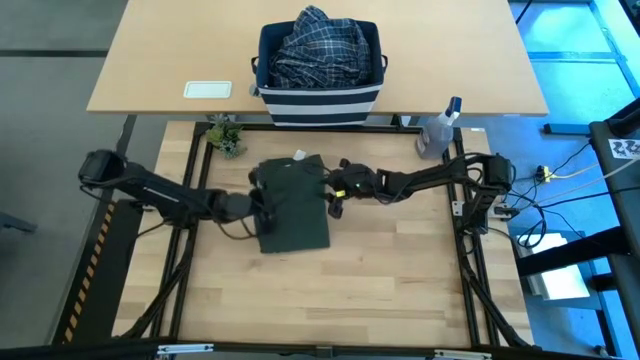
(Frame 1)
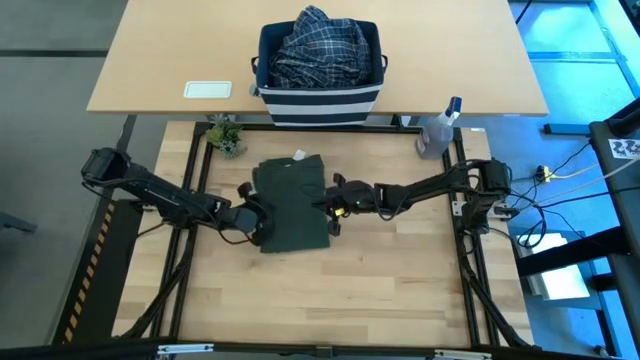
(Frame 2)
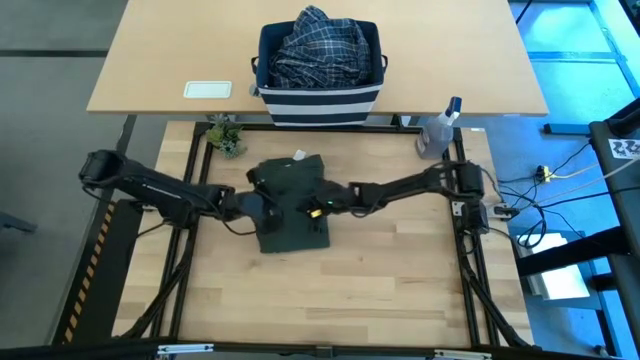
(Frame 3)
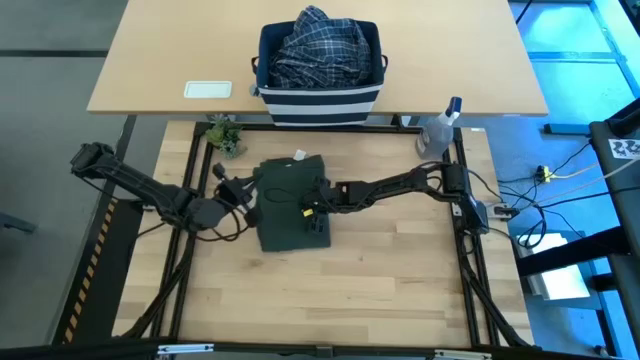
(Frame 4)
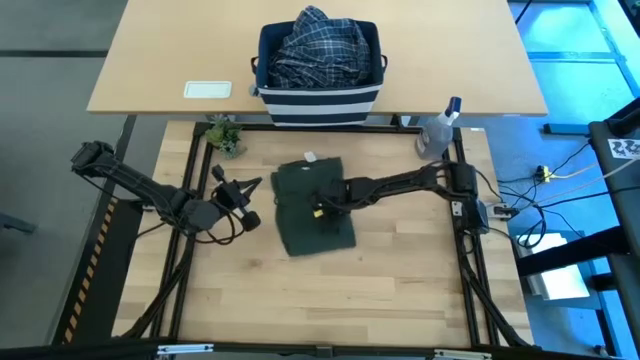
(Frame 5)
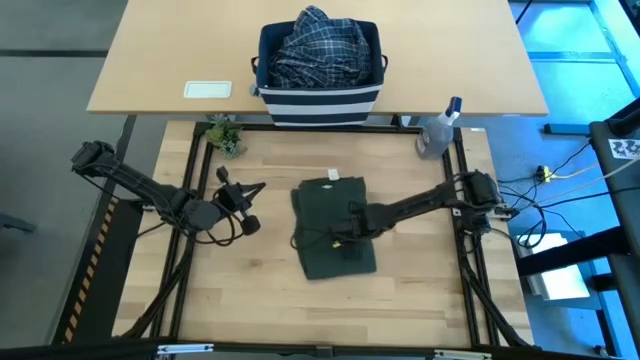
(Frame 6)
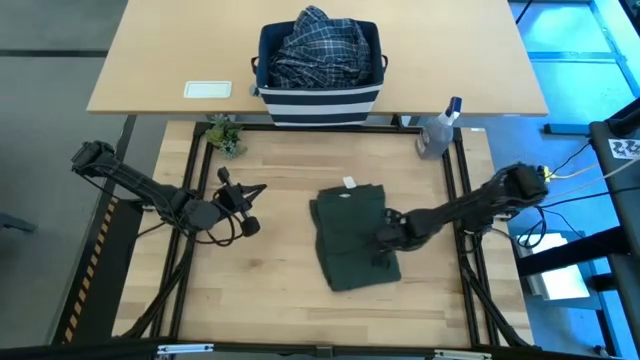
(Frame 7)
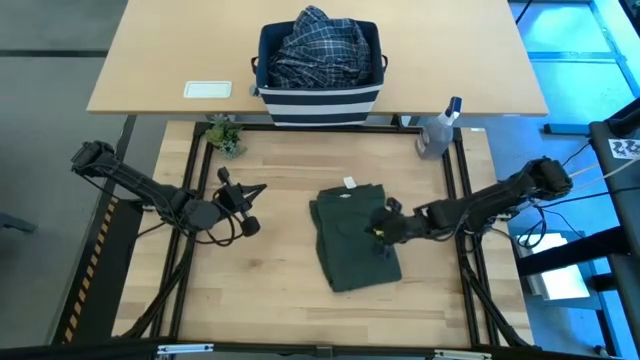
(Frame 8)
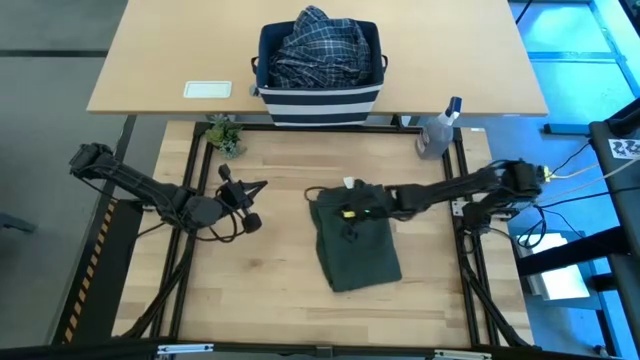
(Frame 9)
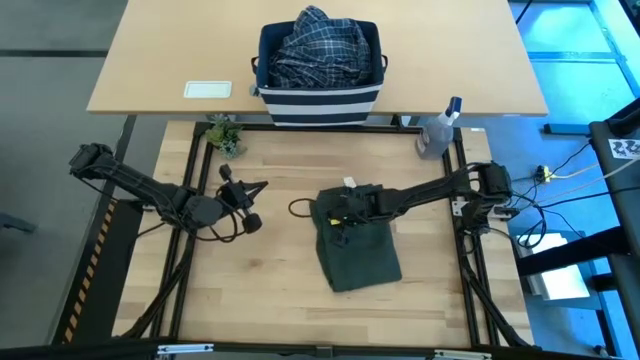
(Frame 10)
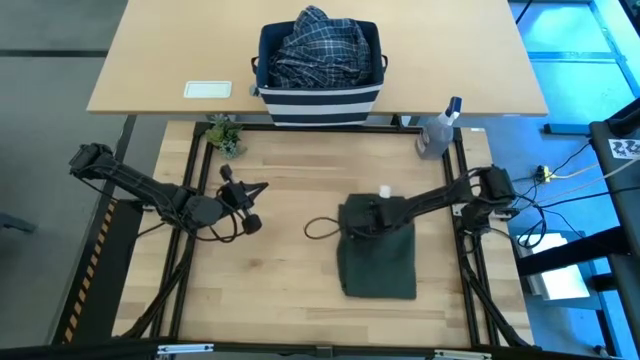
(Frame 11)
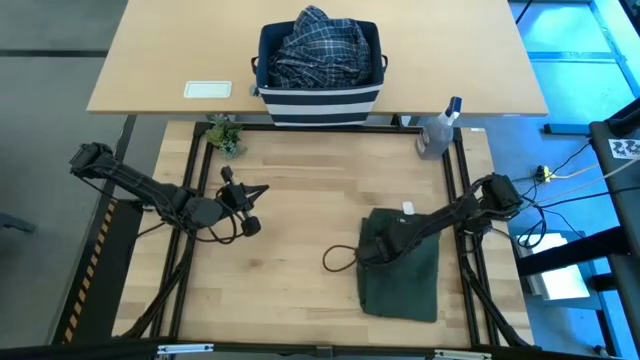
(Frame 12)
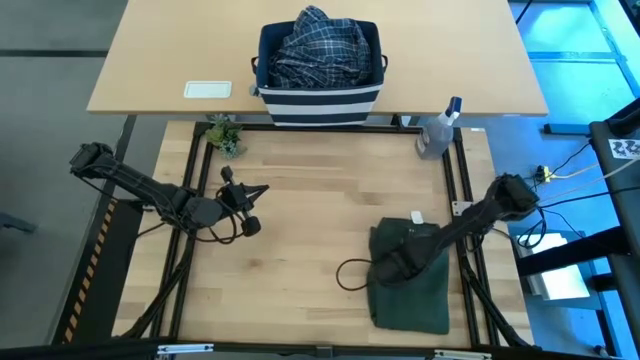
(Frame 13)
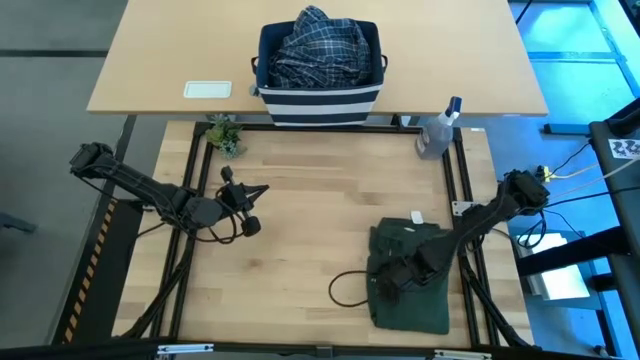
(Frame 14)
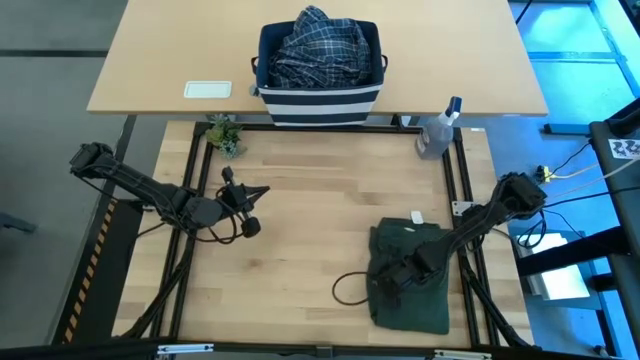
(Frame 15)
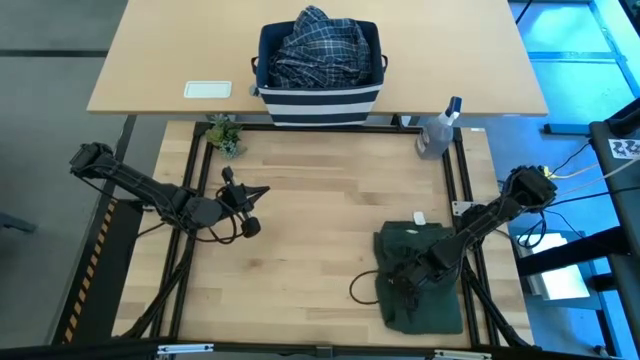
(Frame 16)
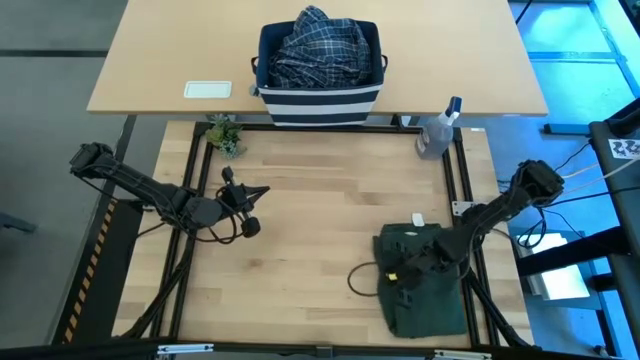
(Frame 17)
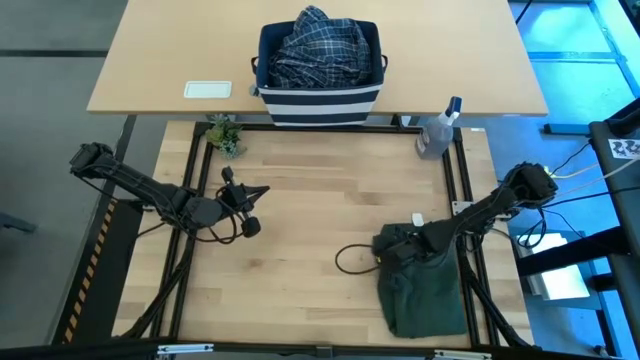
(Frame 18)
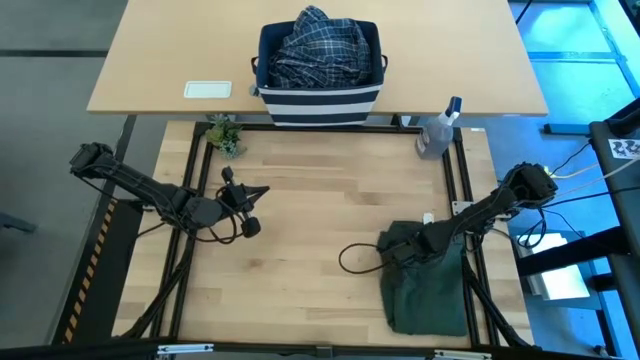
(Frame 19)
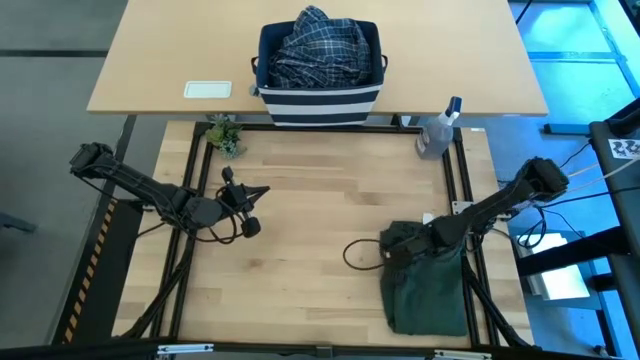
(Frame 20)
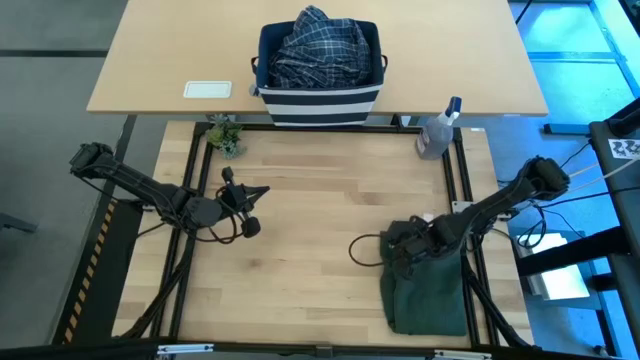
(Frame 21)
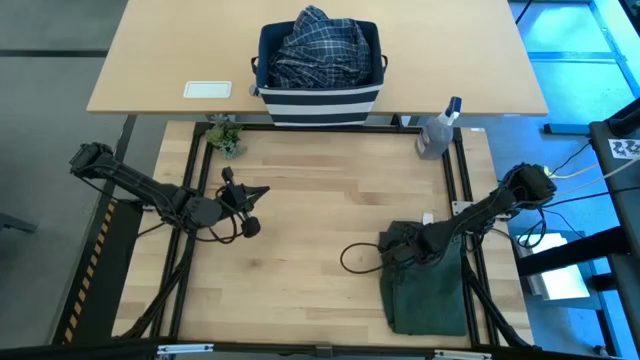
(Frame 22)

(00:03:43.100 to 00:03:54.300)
Task: Fold Laundry from Bin
Move the green polo shirt to the bottom right of the table

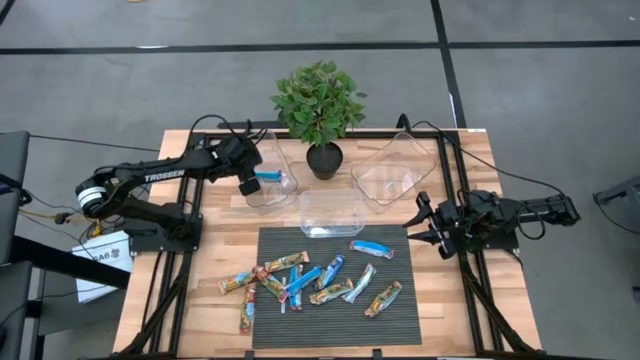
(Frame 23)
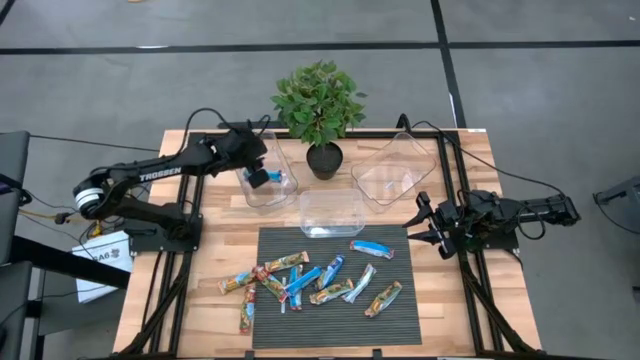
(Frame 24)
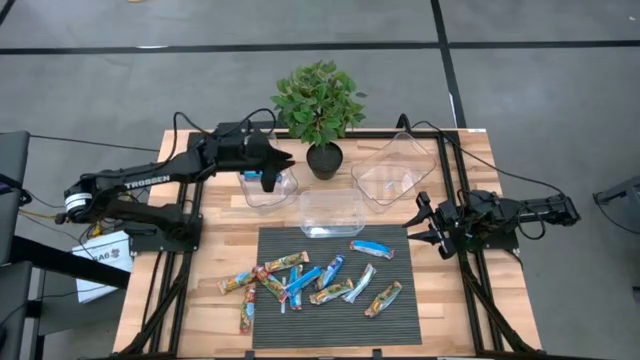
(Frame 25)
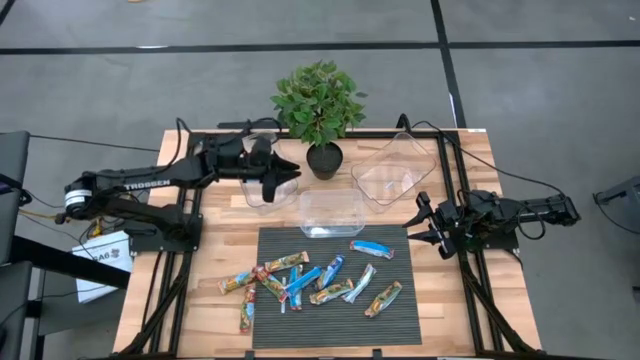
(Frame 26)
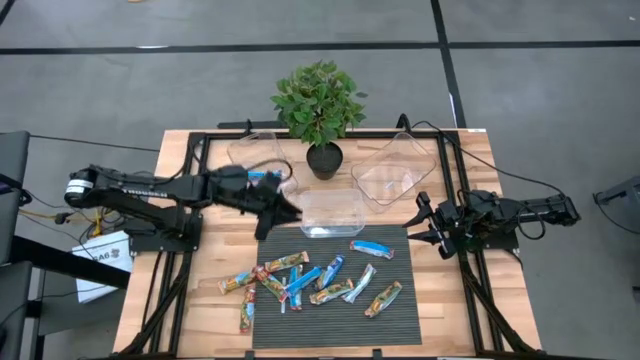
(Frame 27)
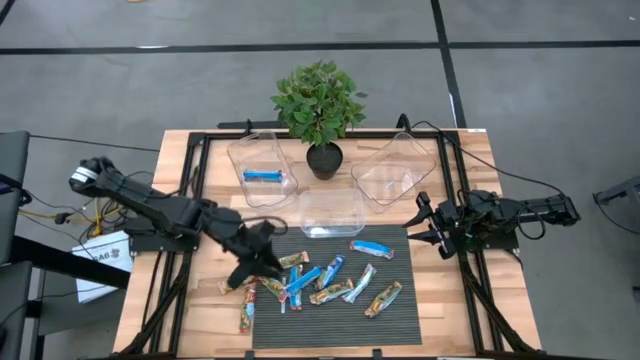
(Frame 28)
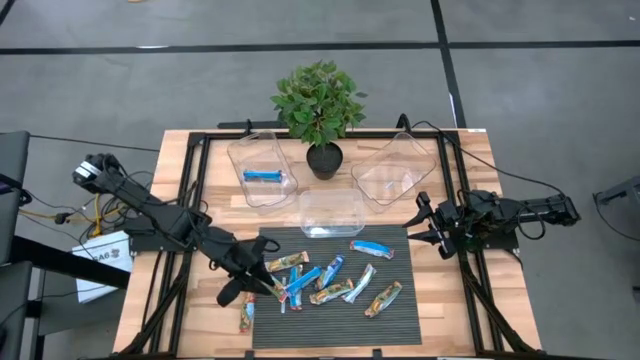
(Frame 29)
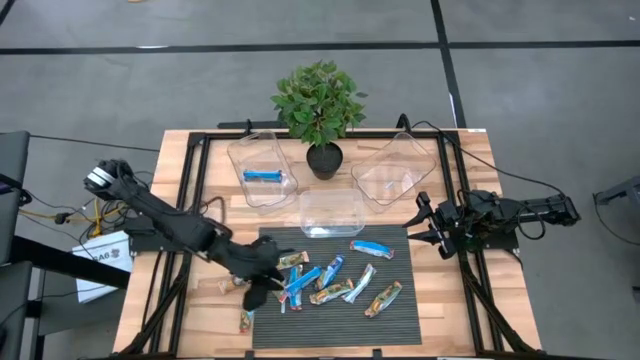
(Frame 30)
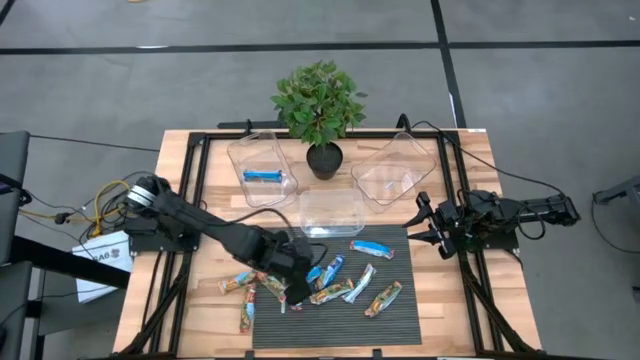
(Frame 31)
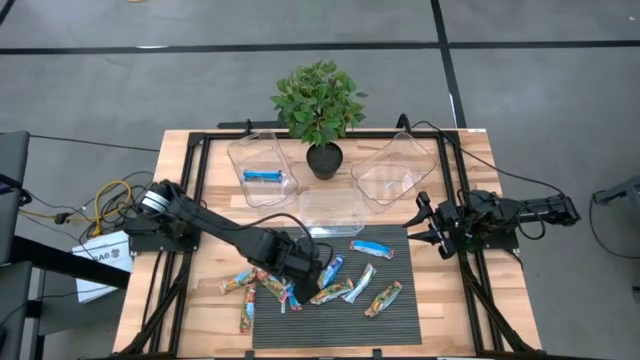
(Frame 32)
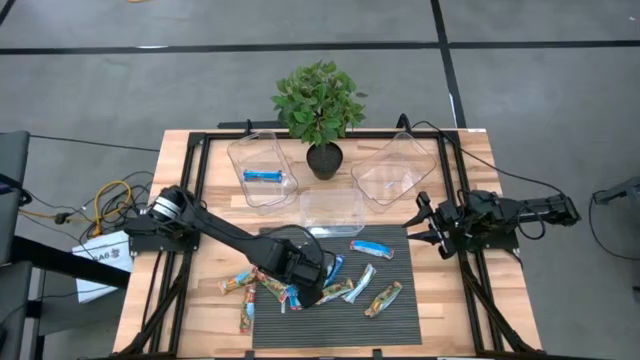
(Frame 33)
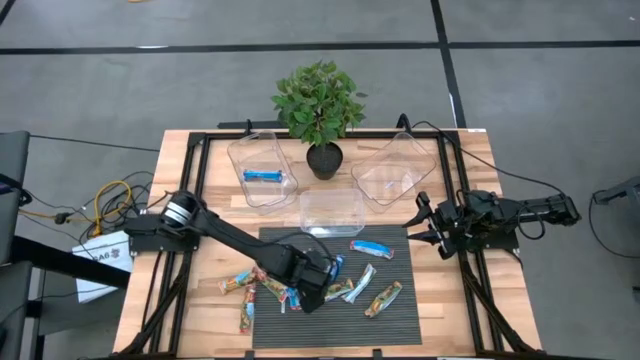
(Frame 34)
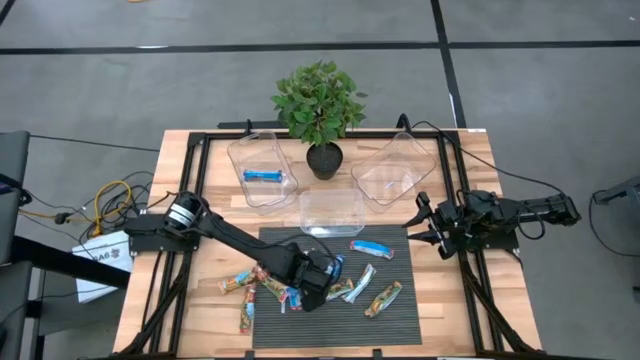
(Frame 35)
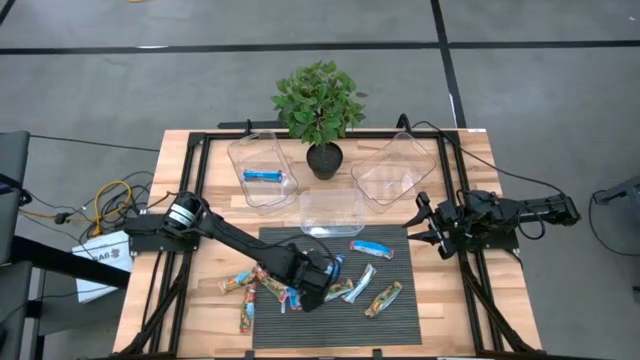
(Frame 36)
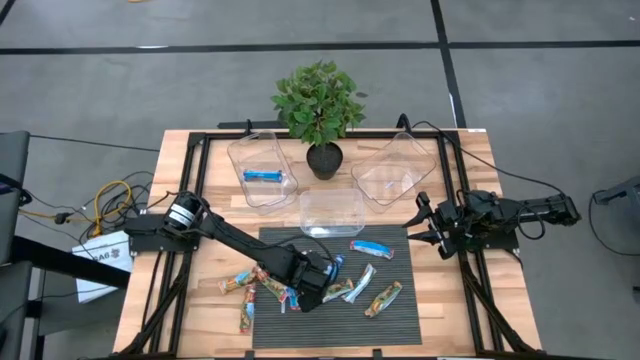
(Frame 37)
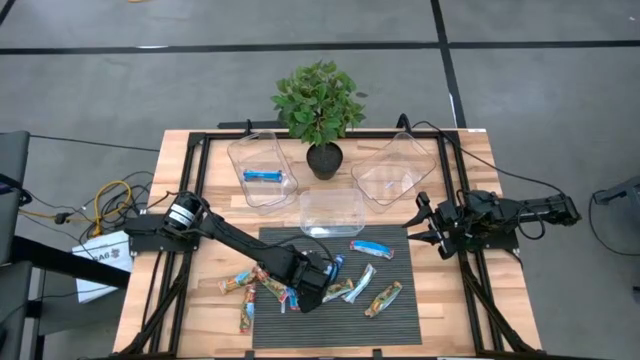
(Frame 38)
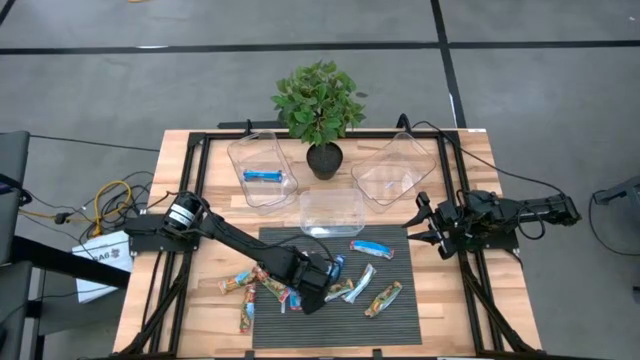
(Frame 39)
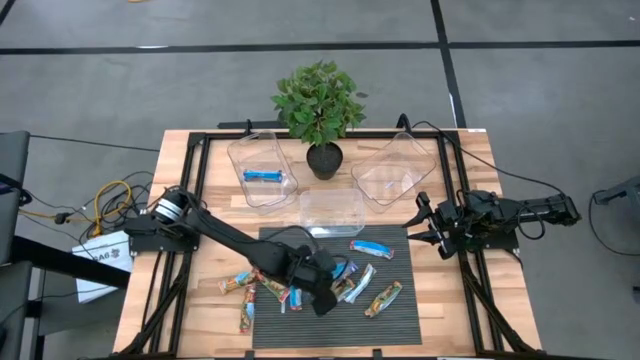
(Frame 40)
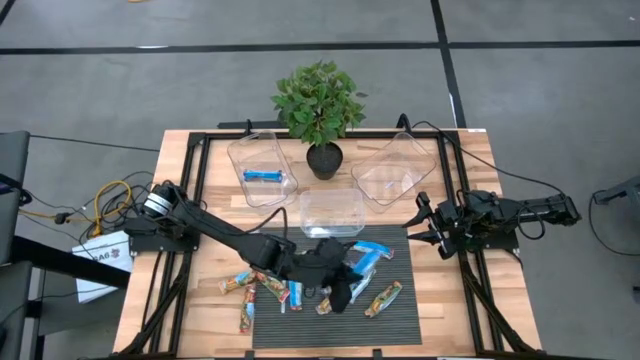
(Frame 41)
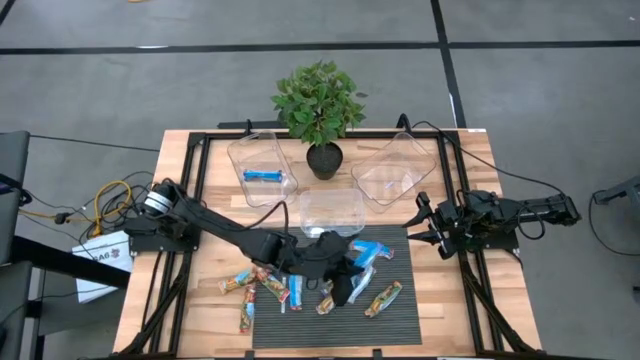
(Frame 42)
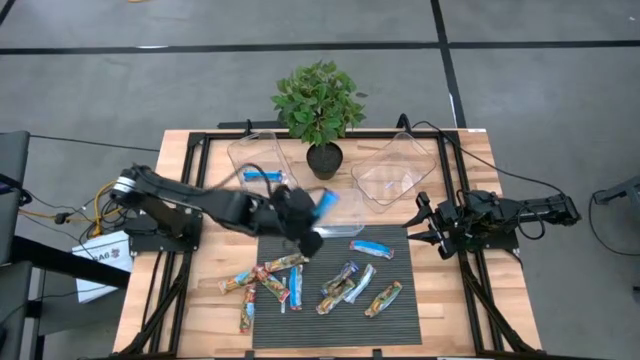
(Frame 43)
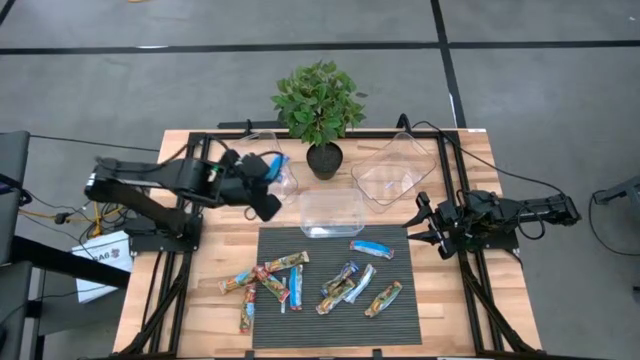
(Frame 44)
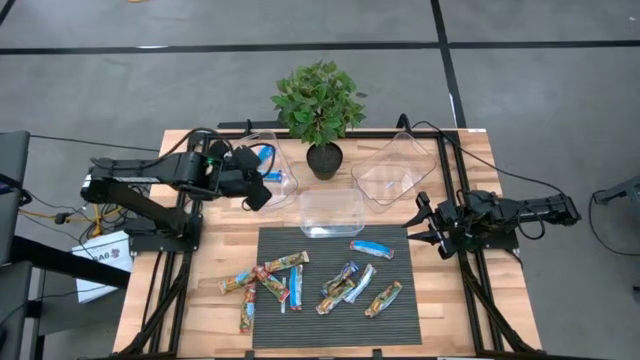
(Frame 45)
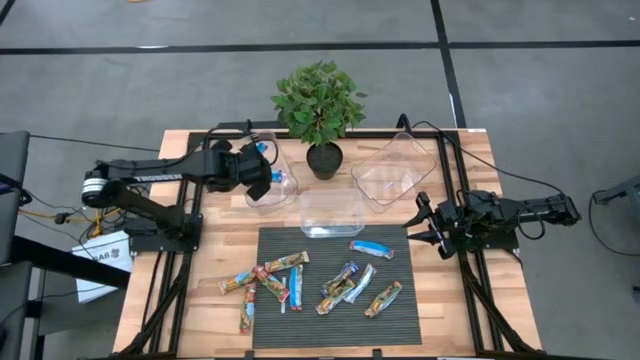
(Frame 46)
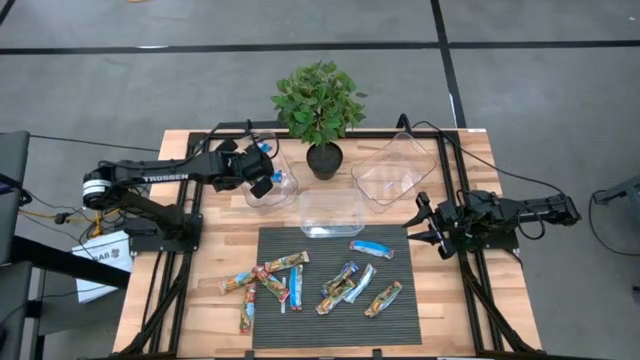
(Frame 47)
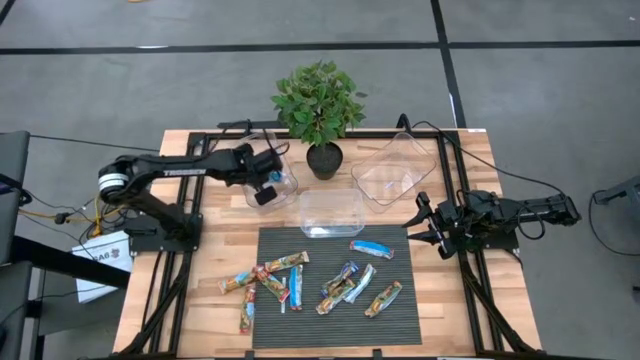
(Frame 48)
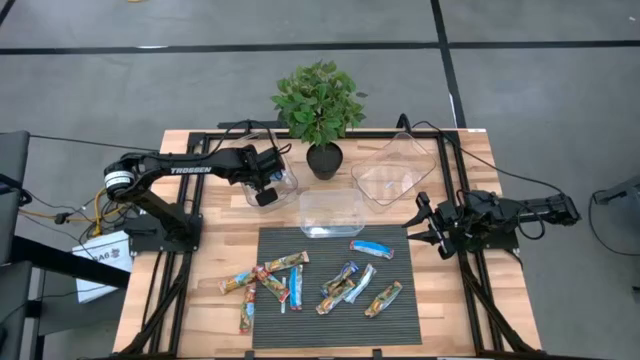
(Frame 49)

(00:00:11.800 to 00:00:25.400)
Task: Pick and place Granola Bars by type
Put the blue granola bar into the left transparent bin
